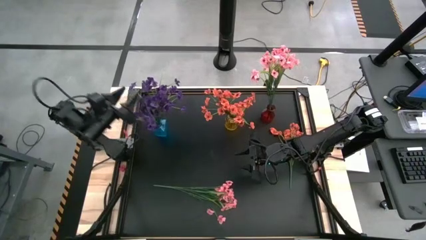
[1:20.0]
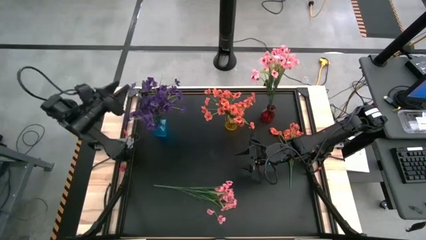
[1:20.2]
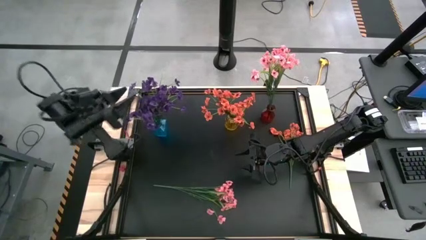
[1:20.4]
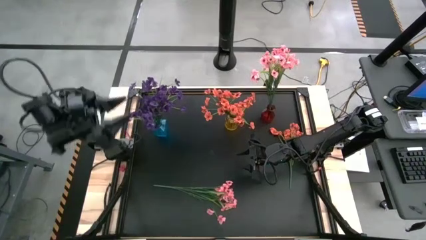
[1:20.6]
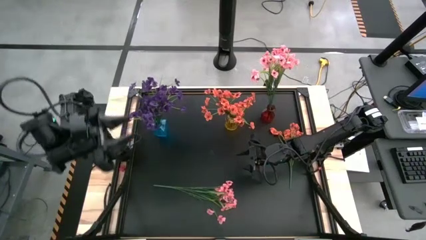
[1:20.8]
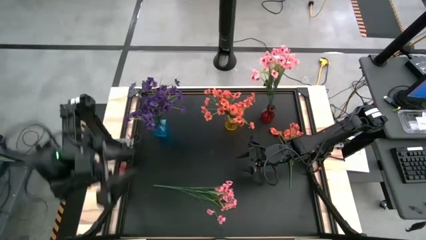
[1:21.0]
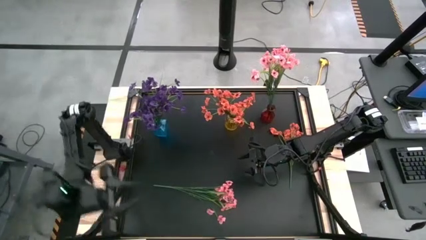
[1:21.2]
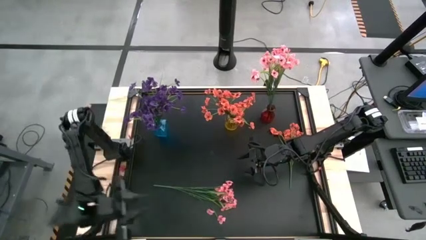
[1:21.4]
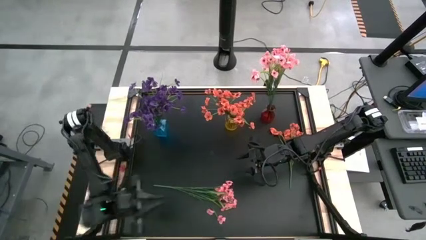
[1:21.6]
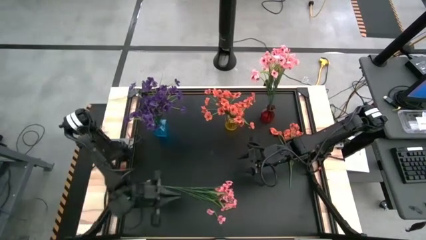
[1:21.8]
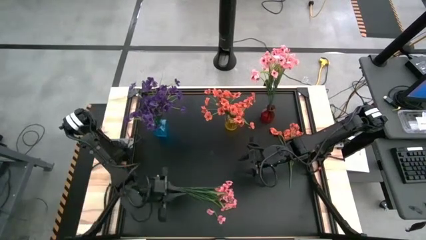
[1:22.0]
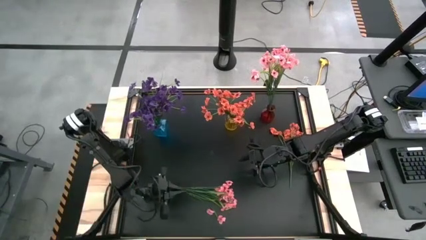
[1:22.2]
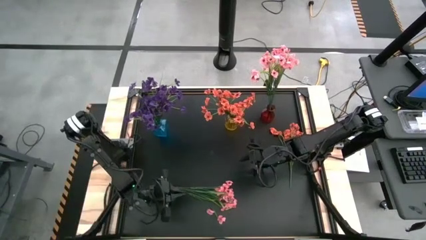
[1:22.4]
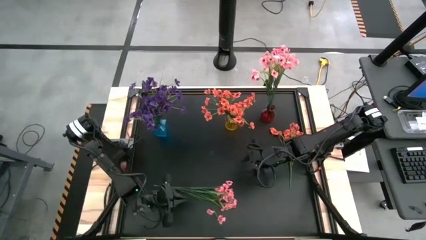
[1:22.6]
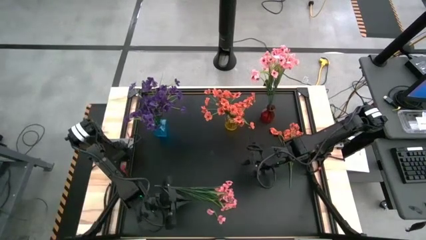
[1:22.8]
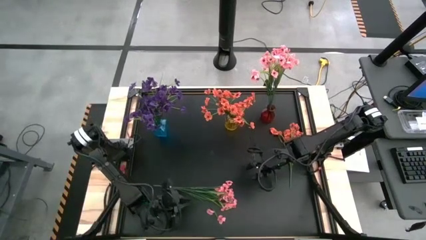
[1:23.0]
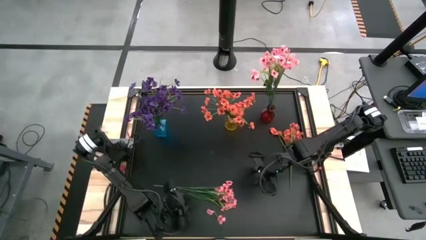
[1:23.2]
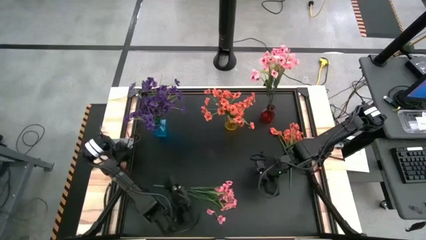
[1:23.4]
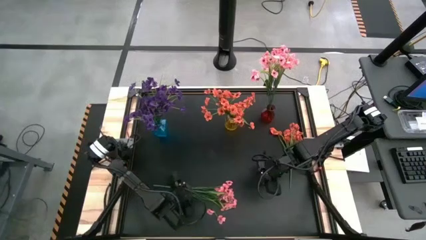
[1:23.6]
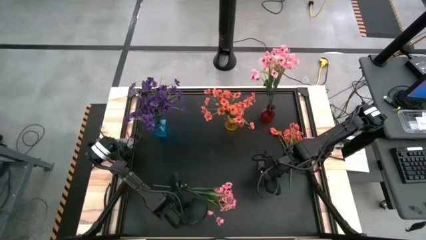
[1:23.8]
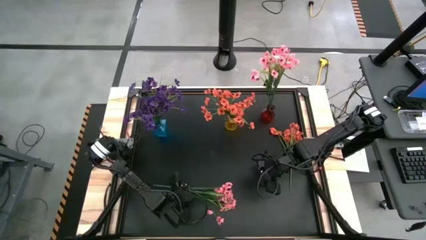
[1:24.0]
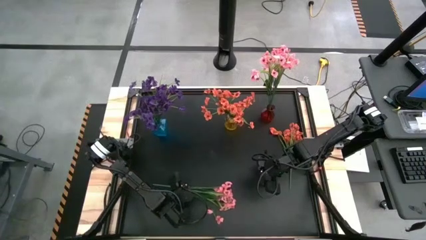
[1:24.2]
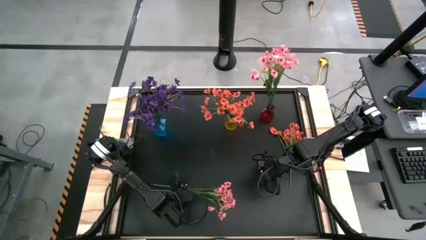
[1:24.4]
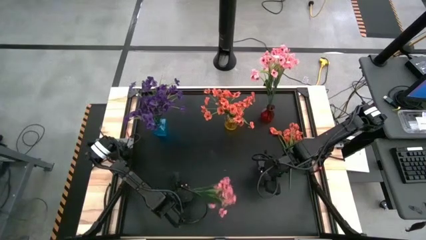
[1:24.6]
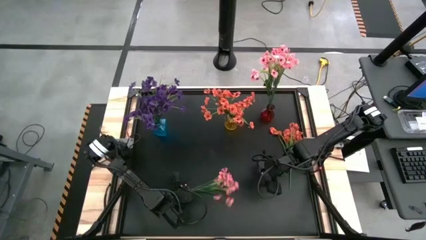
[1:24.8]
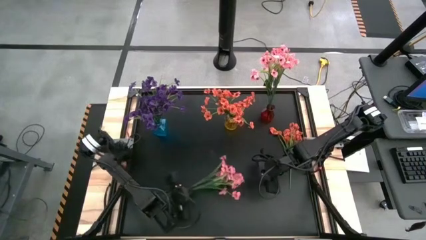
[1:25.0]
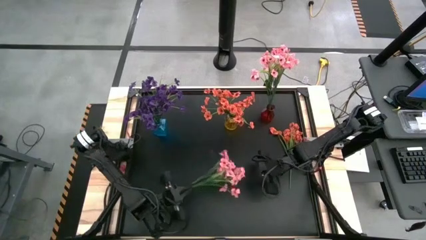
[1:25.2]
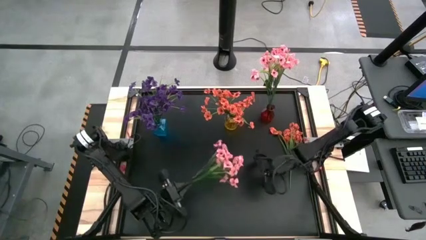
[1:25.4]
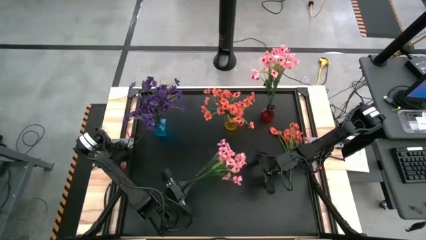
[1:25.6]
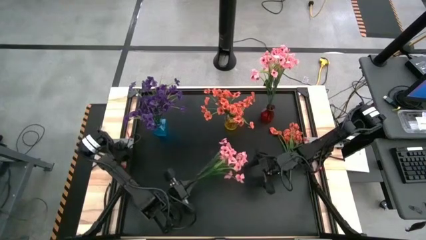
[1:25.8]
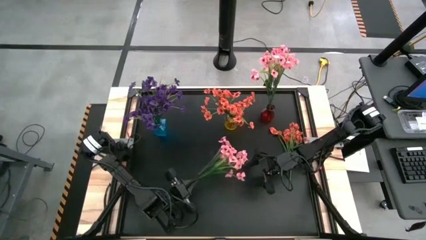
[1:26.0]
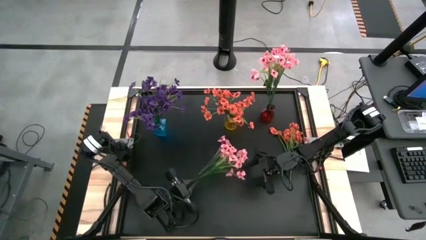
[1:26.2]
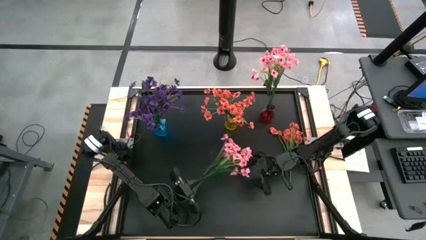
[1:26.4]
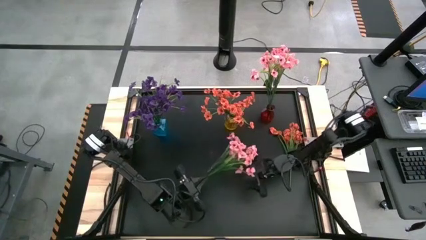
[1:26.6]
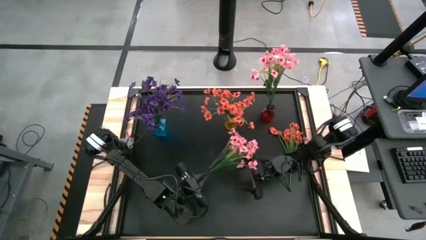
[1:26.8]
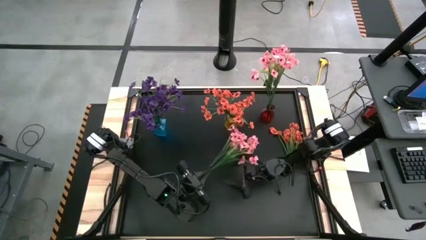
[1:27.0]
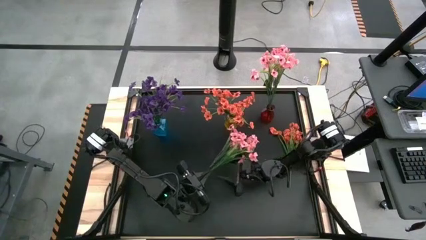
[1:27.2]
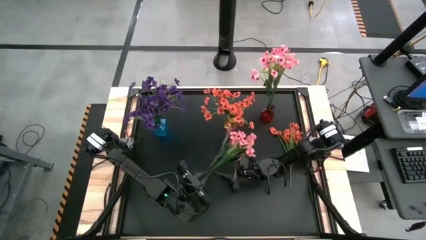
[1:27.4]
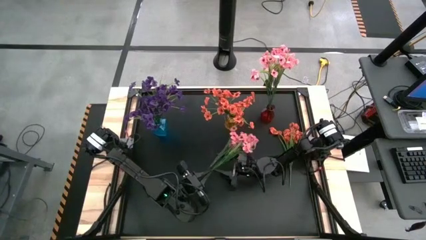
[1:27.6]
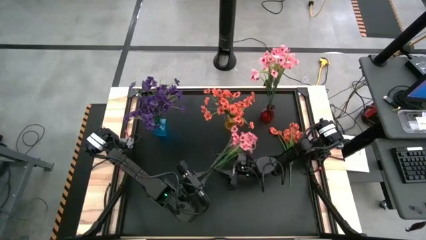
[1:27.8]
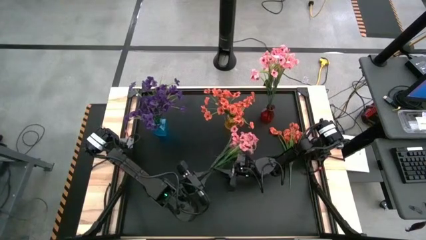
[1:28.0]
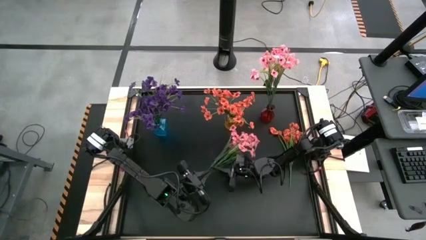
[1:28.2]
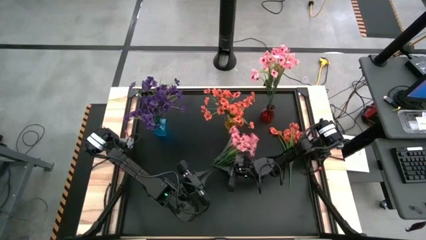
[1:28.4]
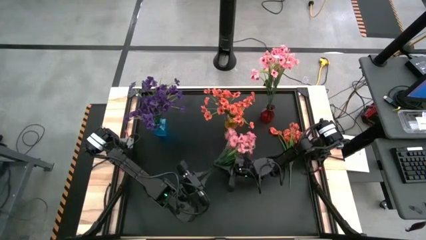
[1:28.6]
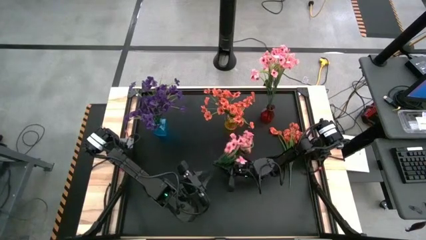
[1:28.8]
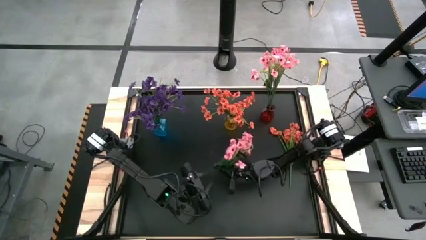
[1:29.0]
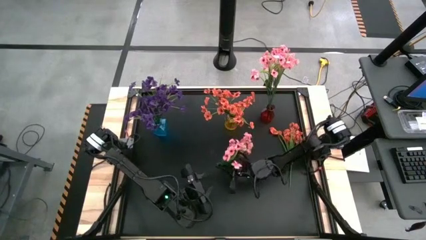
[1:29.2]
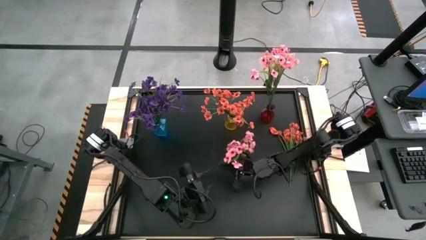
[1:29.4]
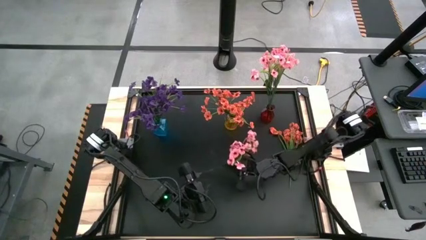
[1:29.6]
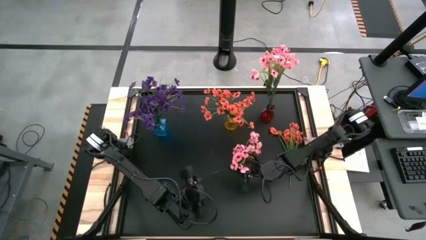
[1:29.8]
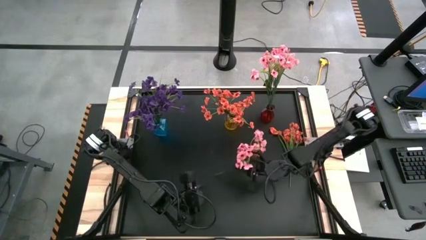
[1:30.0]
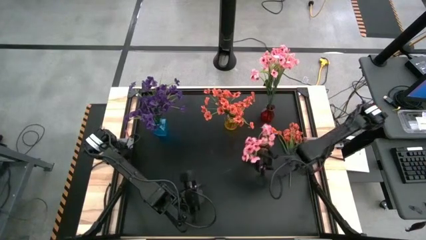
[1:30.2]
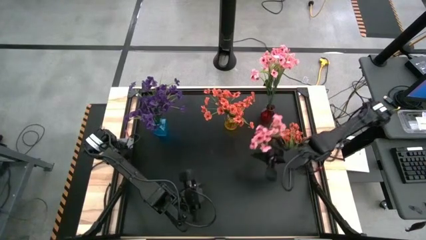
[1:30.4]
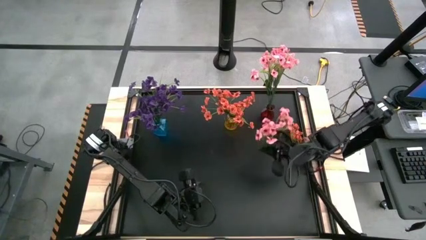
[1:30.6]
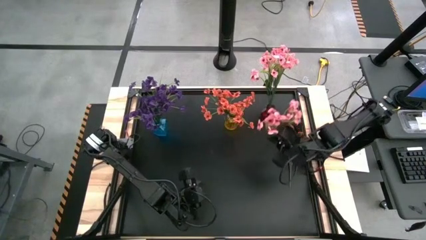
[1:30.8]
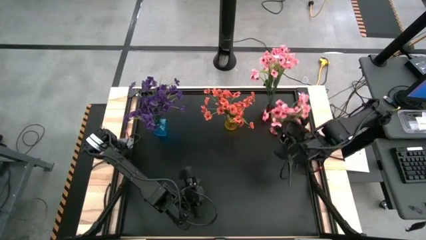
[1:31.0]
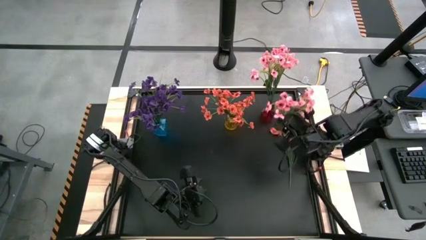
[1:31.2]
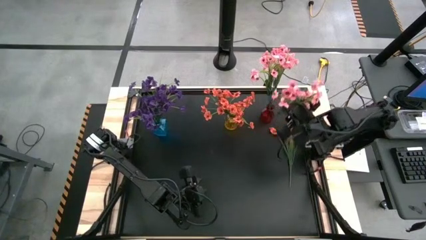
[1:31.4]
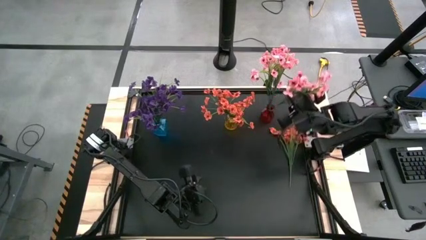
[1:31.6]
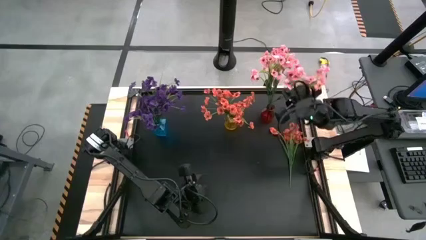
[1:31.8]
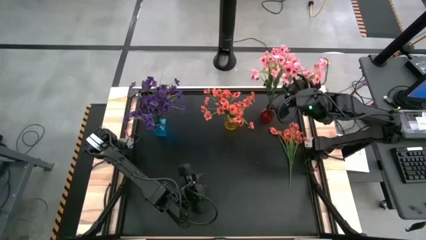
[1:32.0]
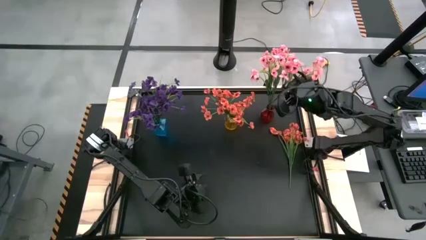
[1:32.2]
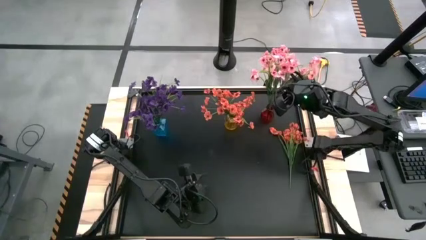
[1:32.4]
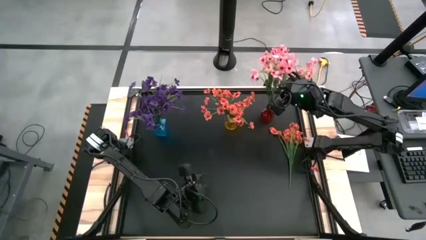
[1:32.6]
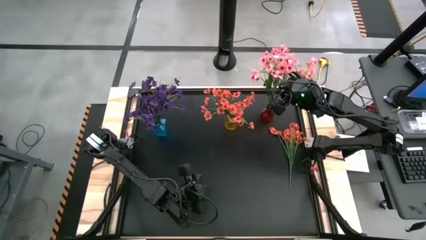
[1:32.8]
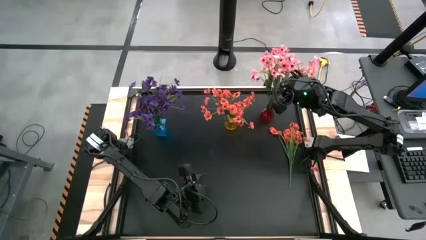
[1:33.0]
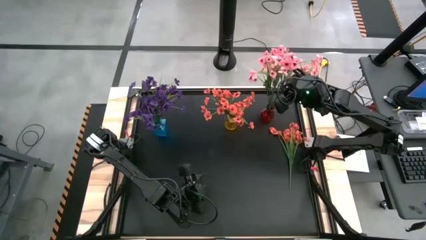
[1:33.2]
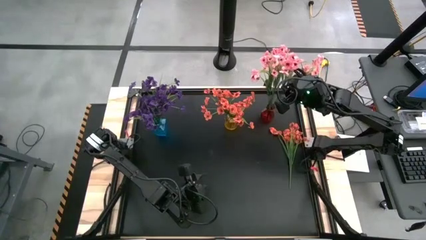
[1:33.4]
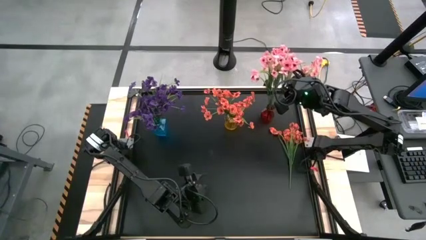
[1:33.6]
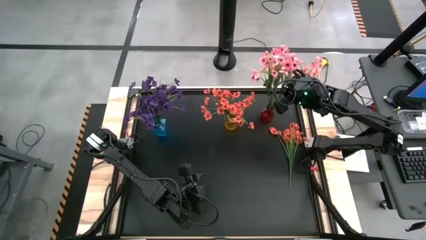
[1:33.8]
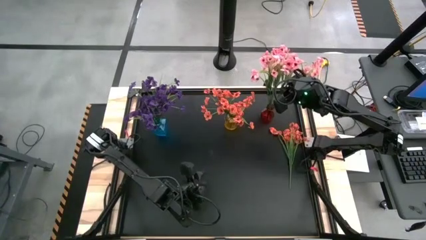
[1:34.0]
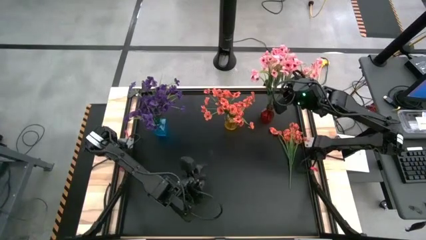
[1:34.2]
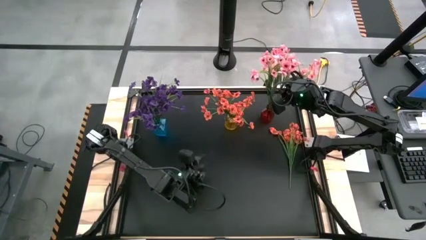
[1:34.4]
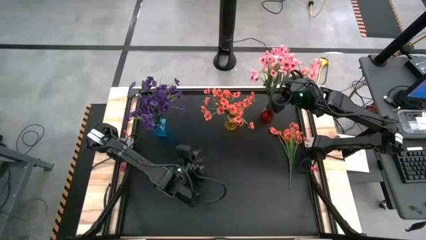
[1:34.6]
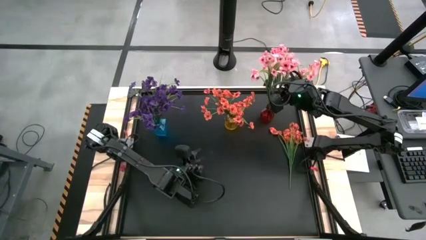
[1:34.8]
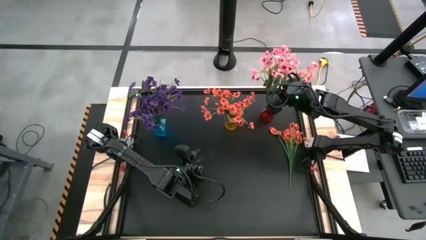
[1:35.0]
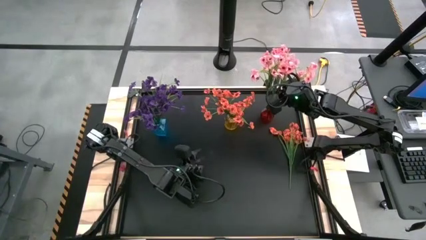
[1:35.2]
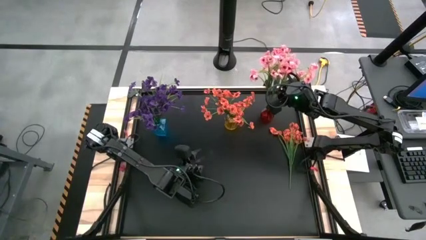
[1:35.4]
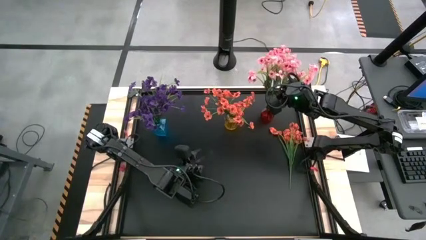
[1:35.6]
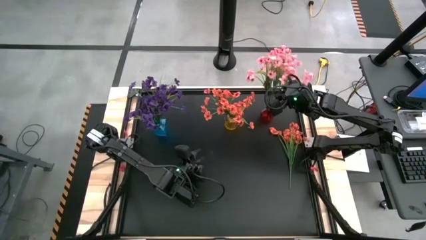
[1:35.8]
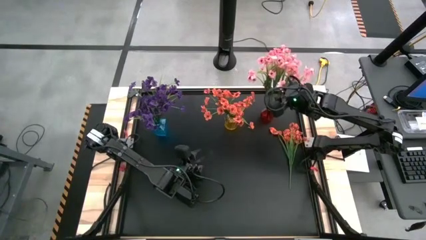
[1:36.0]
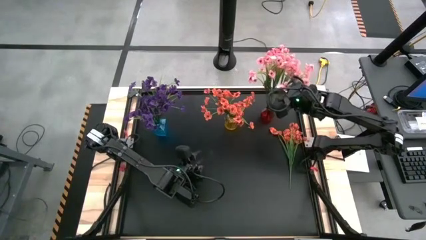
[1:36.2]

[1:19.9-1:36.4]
Task: Sort flowers into vase by color
Put the pink flowers into the red flower vase

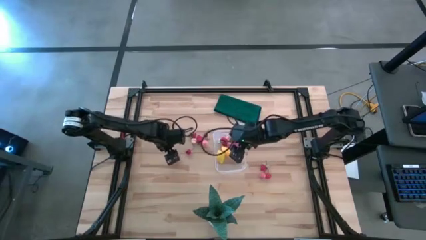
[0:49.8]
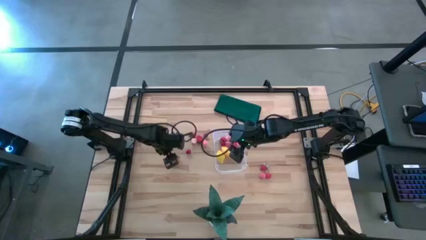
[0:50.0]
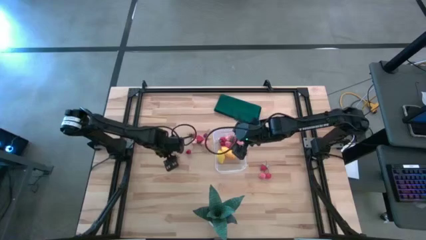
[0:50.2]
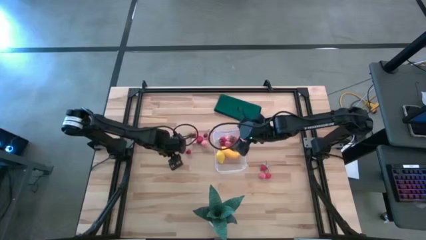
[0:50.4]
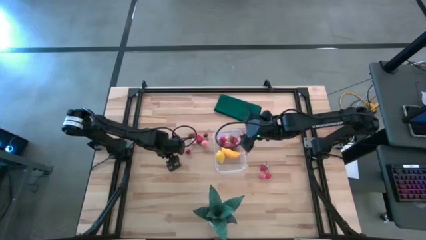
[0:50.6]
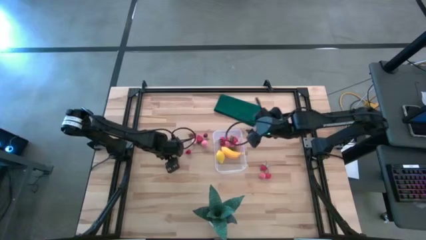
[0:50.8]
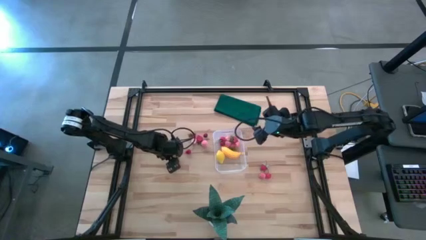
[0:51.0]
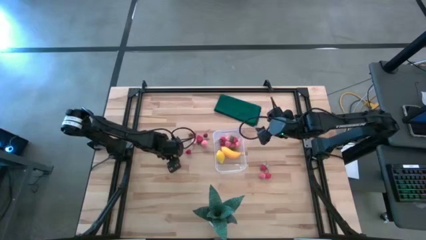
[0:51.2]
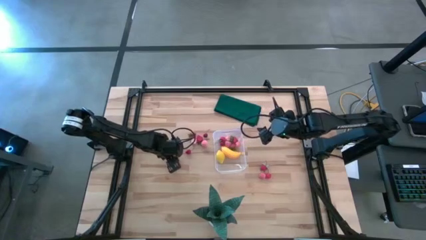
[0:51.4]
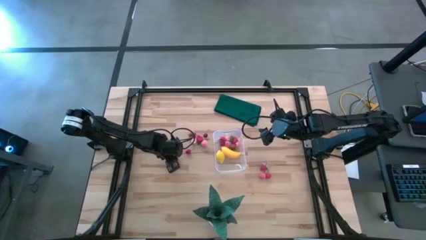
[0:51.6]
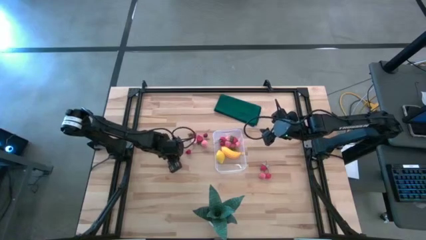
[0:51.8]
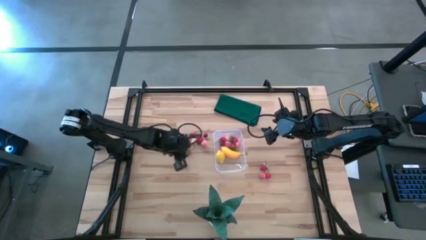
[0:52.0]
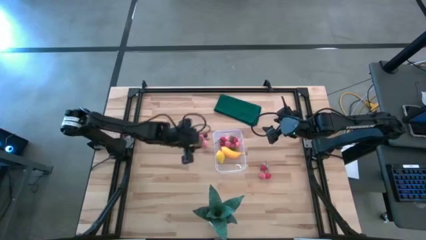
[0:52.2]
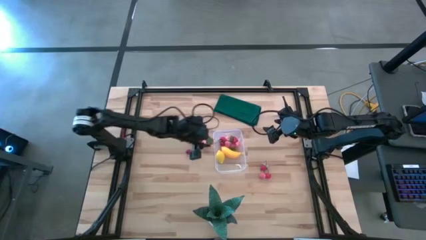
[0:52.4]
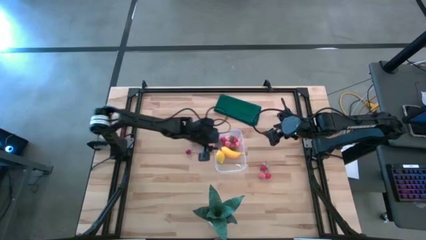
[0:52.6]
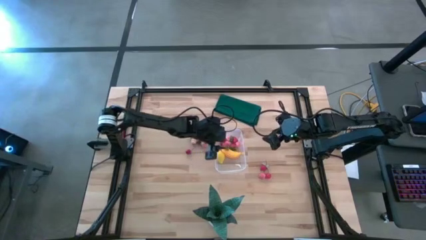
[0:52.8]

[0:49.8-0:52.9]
Task: Pick and placing Produce into tupperware
Put the strawberry into the transparent bin
